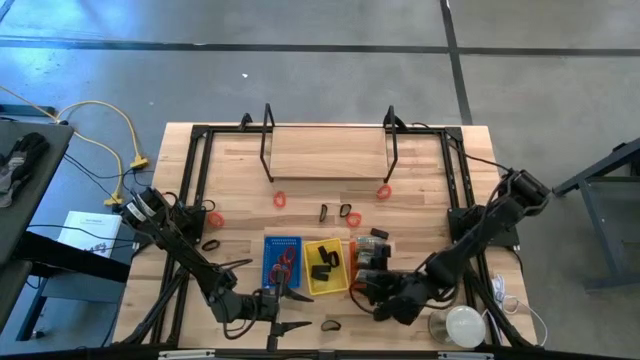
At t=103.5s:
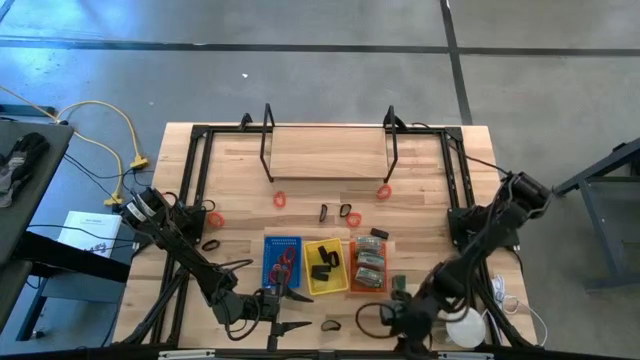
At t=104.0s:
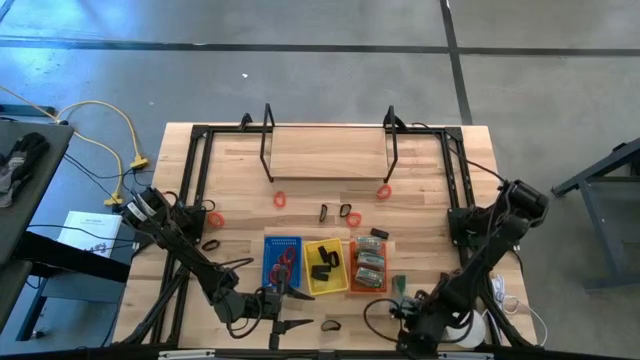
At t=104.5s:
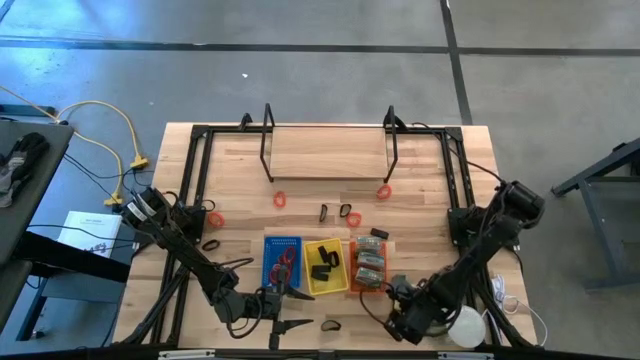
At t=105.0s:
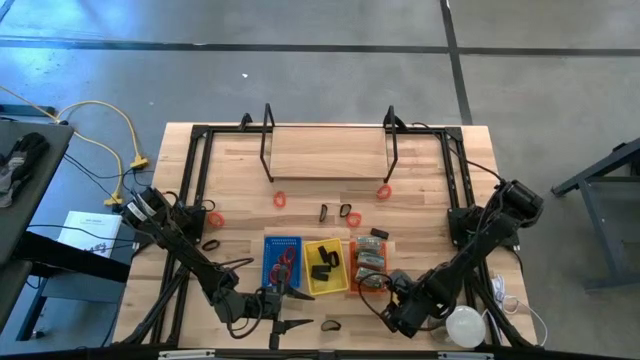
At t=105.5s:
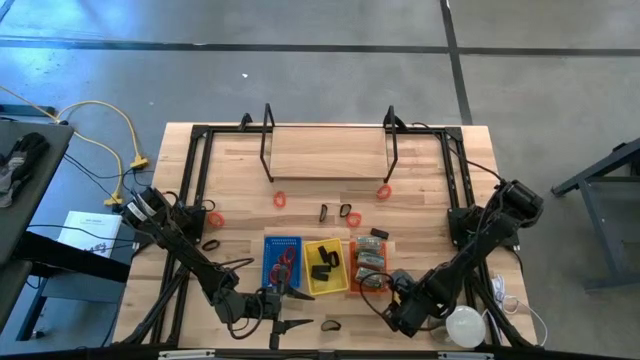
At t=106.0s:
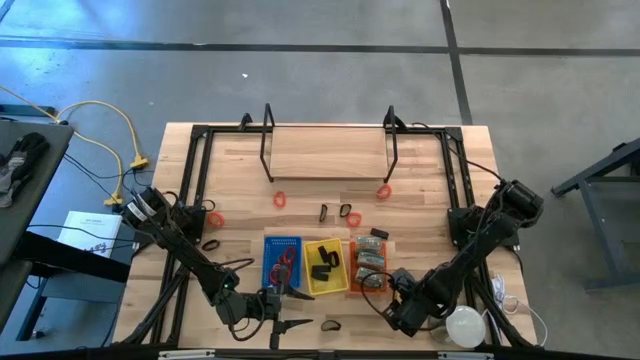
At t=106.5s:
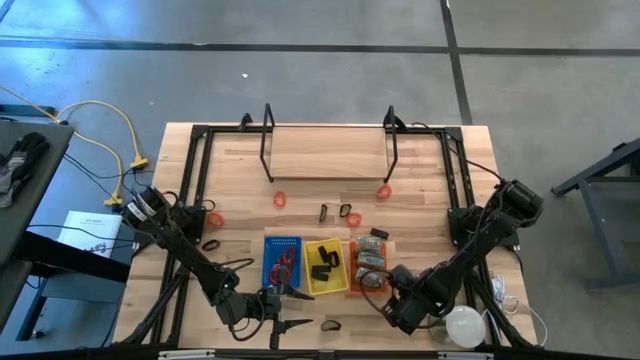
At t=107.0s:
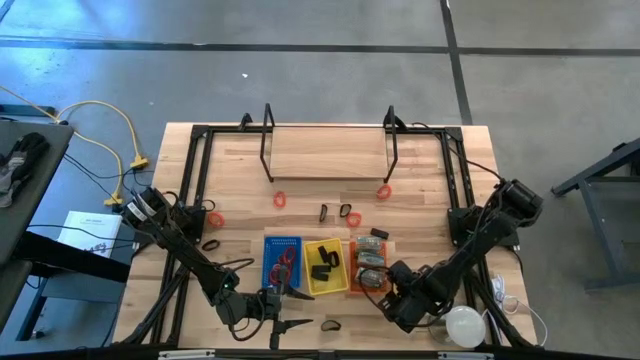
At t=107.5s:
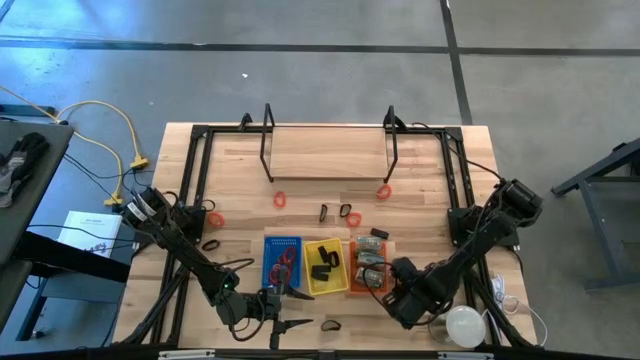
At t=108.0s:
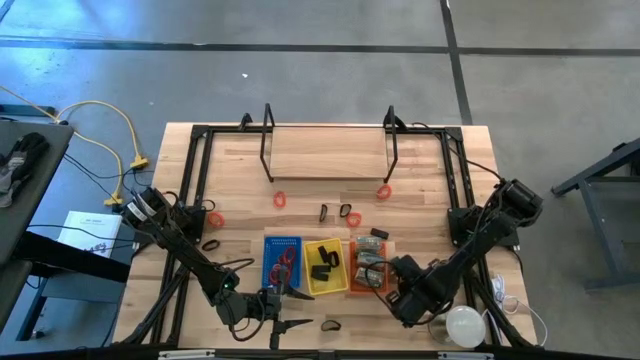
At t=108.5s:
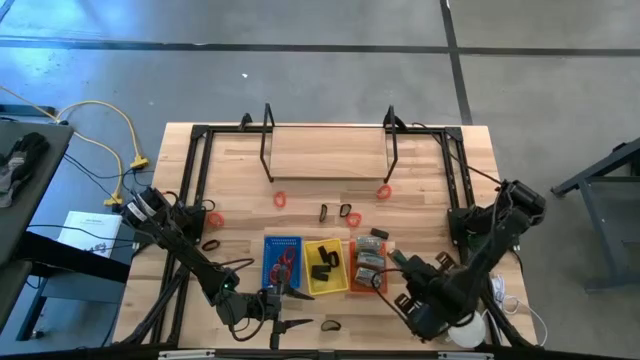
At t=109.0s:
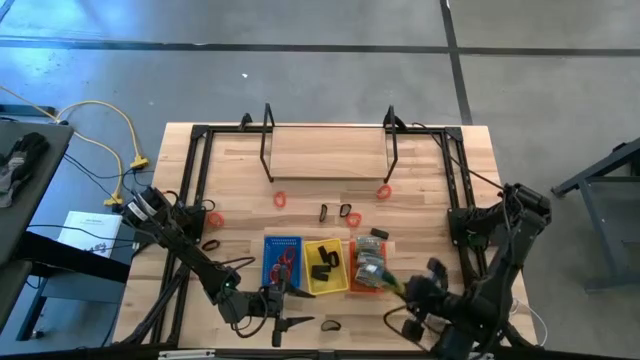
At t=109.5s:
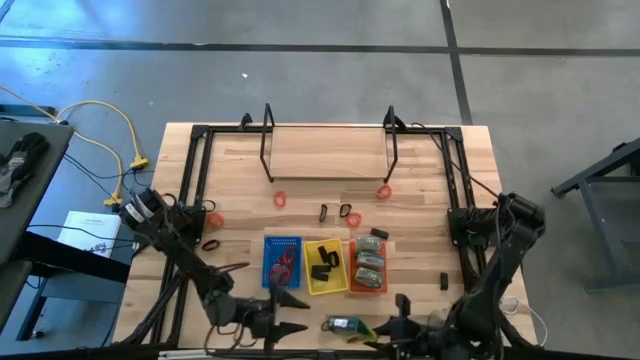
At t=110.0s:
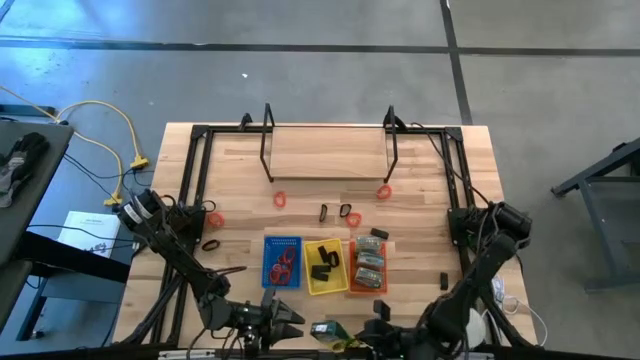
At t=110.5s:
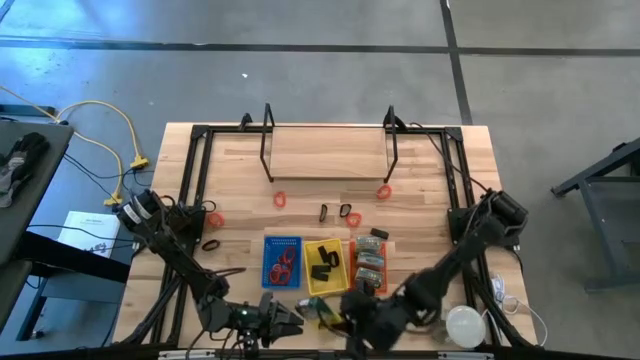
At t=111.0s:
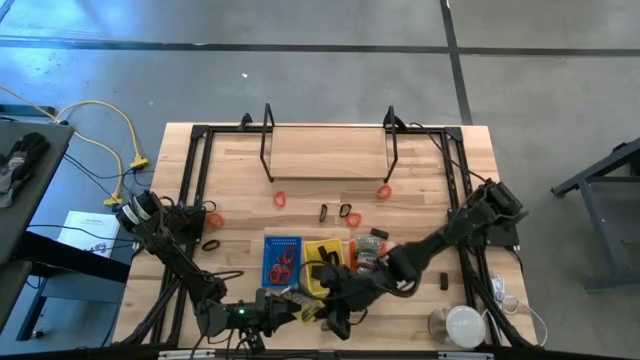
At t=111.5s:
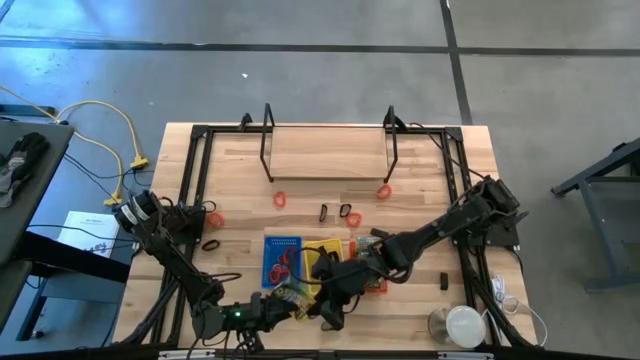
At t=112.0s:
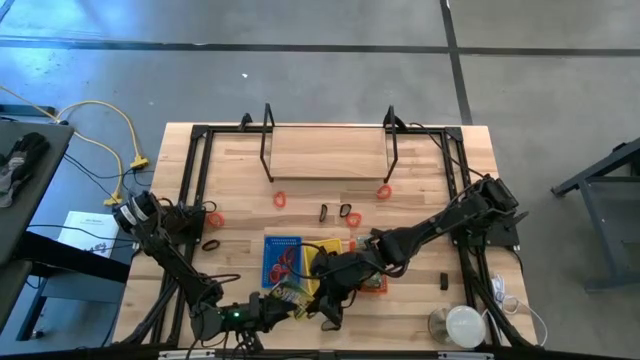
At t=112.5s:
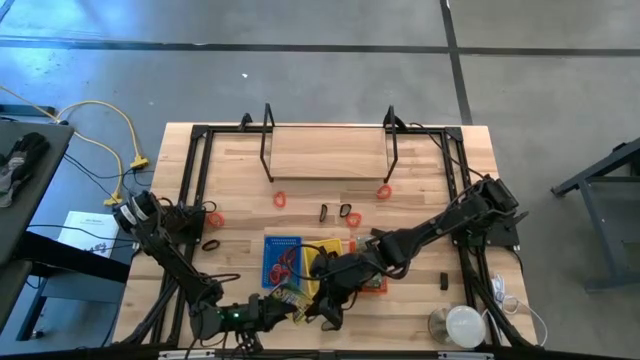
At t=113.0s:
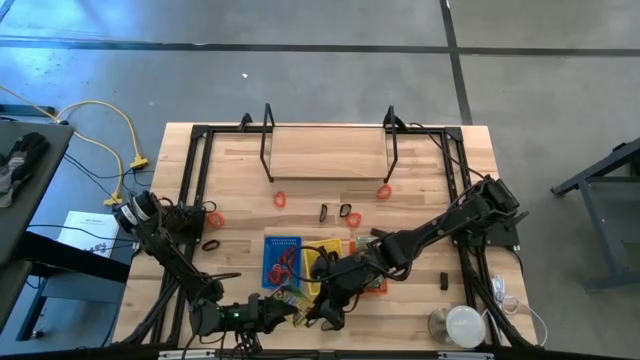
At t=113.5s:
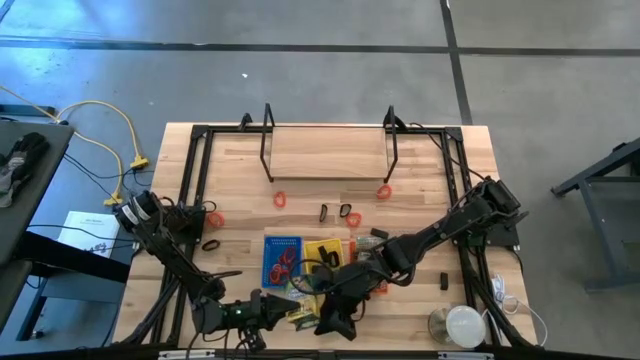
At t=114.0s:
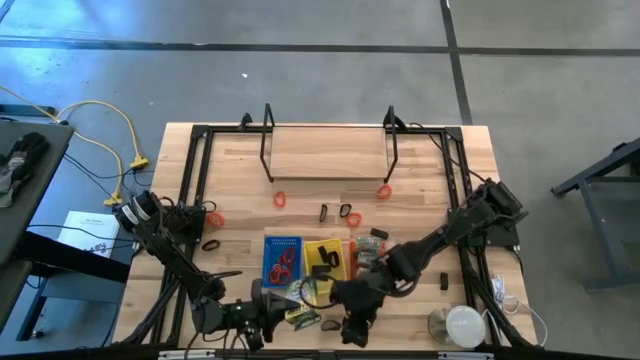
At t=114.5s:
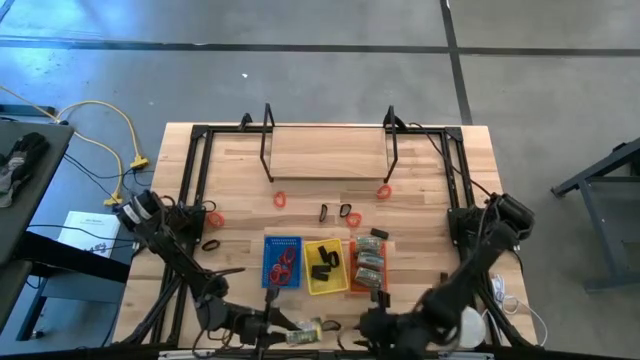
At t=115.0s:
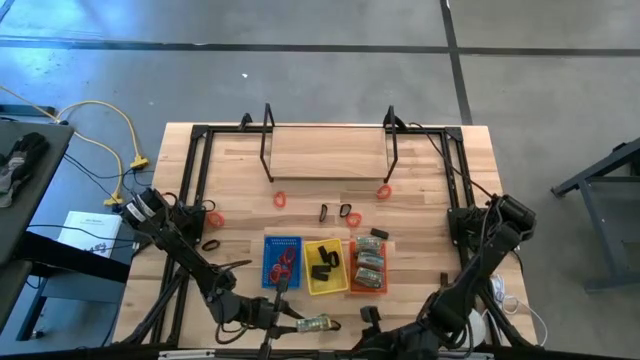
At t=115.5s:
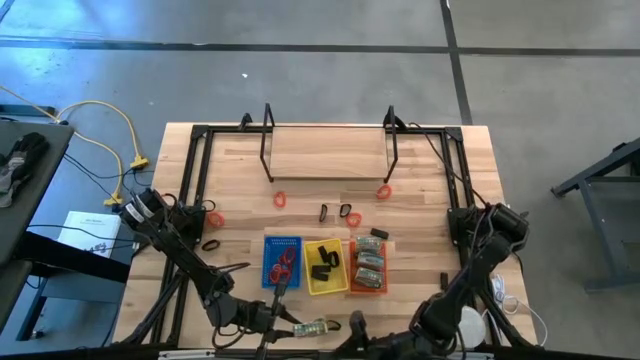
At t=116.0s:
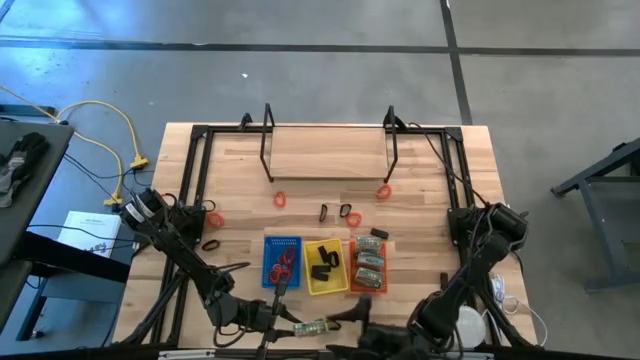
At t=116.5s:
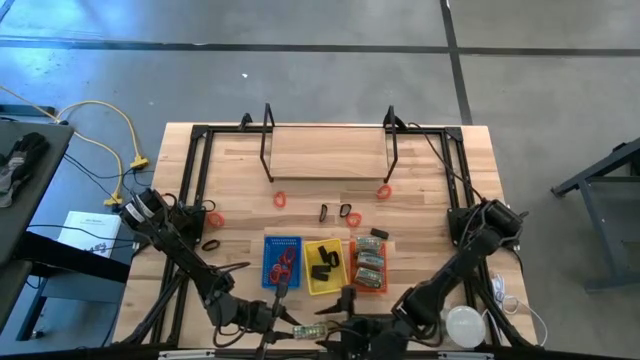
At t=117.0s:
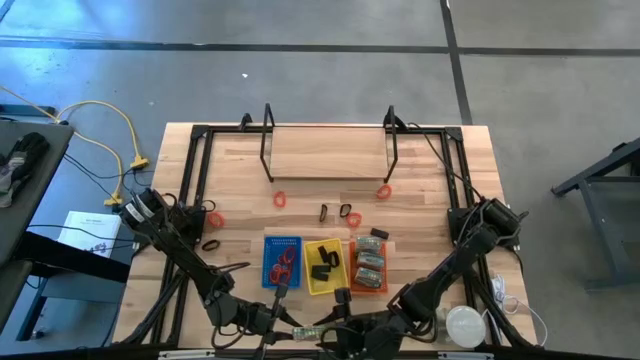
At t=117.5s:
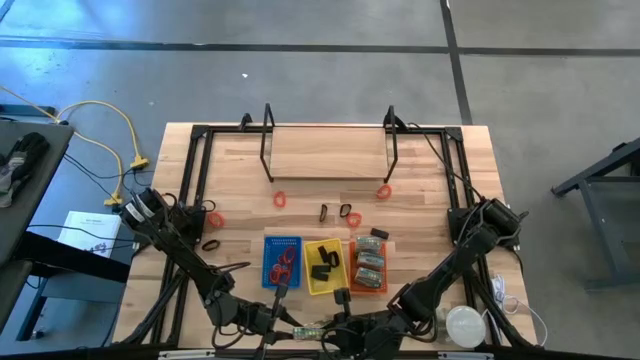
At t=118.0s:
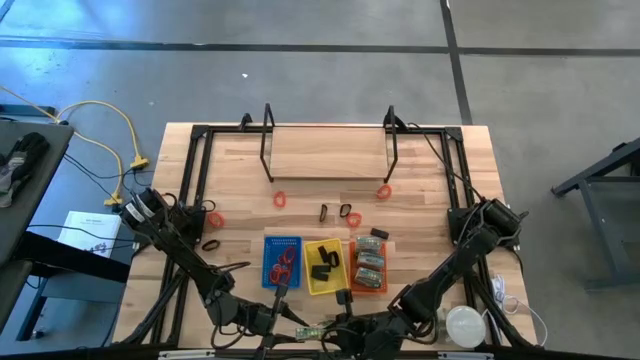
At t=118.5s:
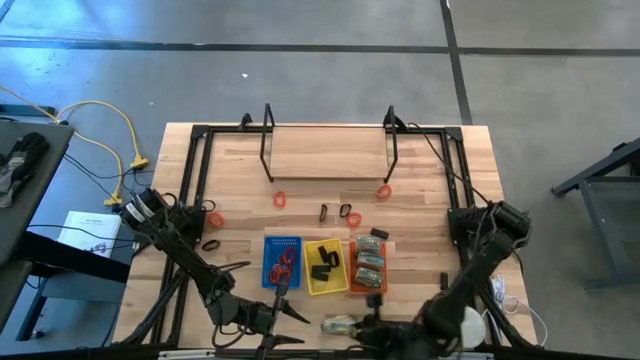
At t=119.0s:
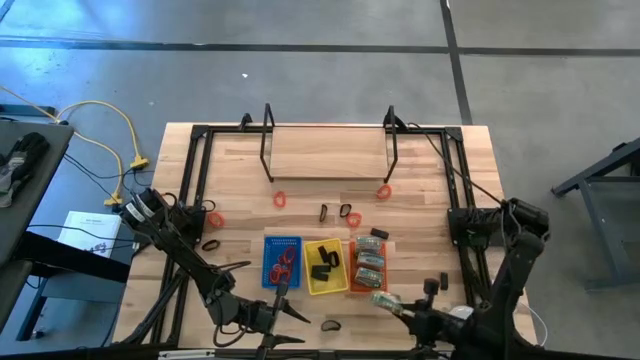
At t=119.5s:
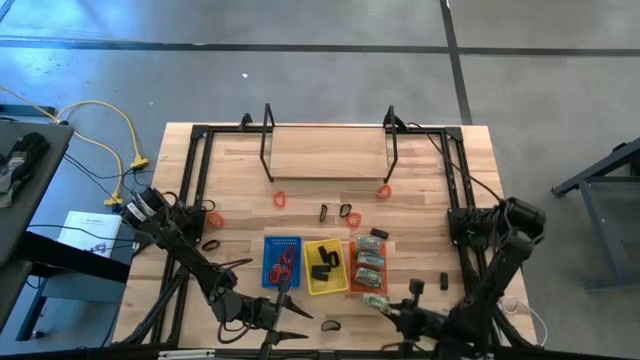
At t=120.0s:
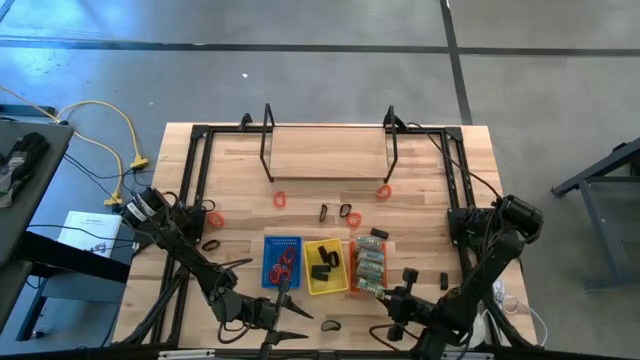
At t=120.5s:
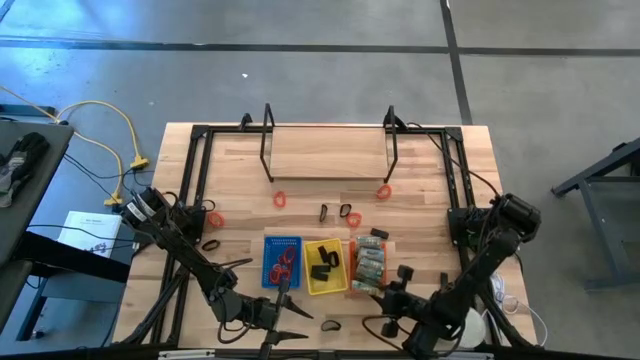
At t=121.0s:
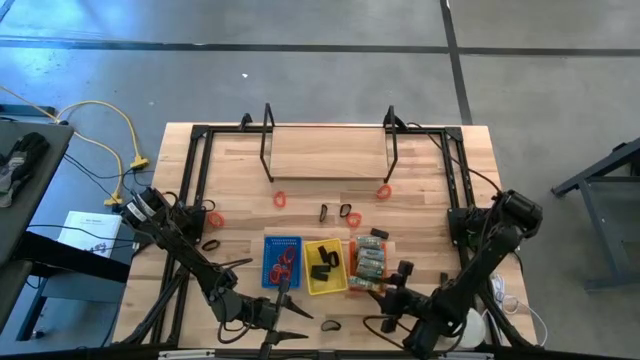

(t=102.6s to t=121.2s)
Task: Pick & Place Office Desk Supplies
Put the crayon box into the orange basket

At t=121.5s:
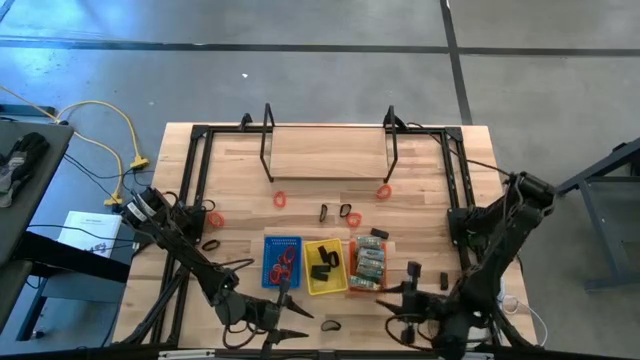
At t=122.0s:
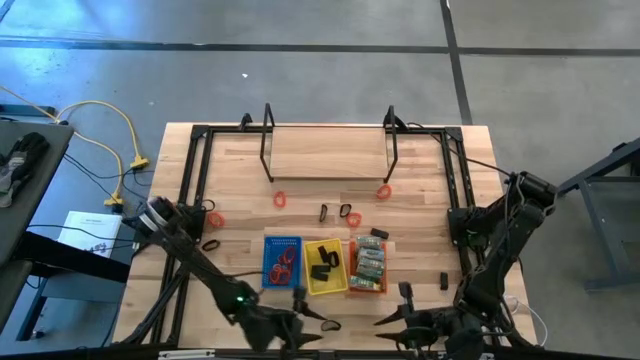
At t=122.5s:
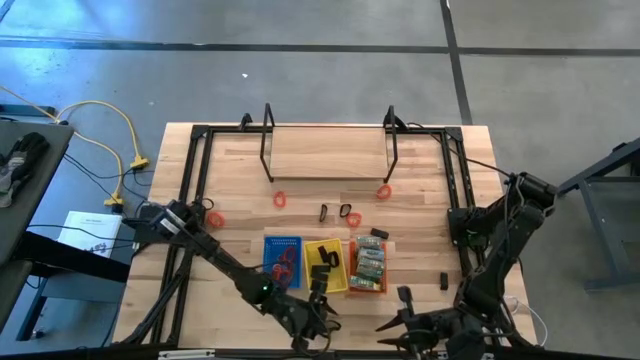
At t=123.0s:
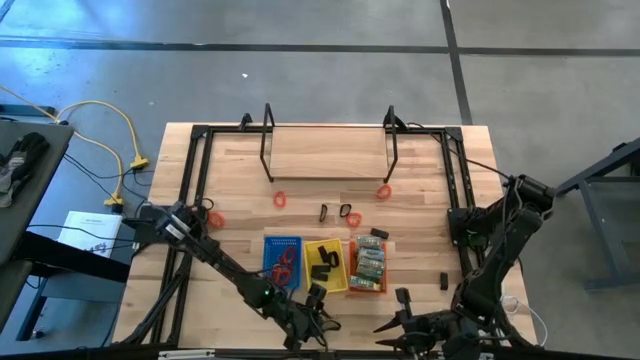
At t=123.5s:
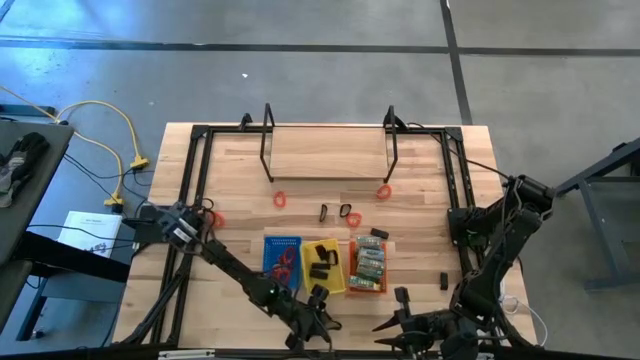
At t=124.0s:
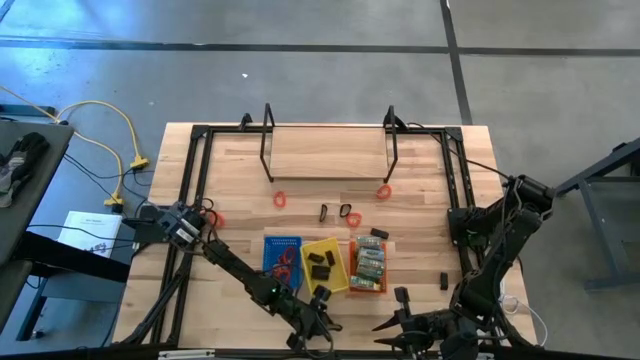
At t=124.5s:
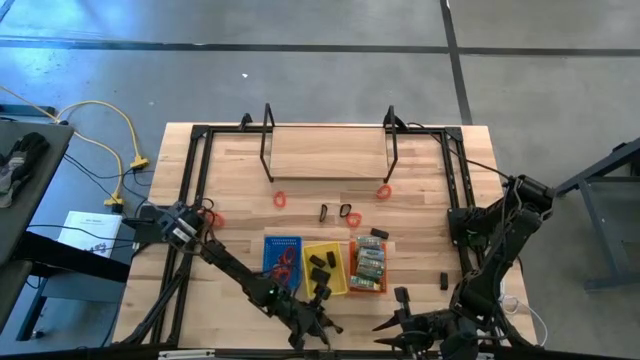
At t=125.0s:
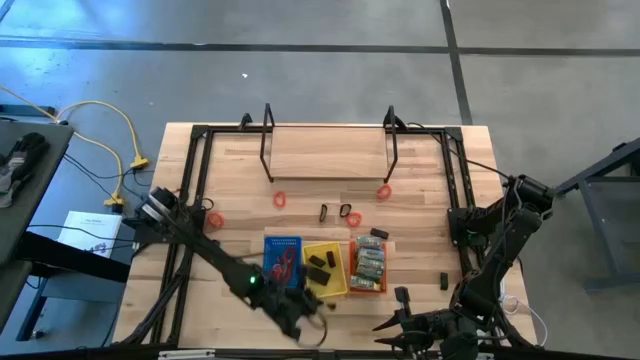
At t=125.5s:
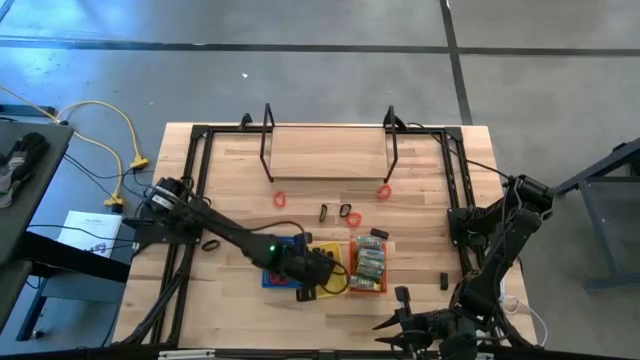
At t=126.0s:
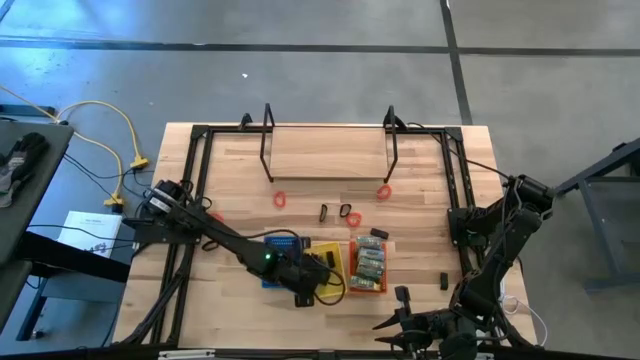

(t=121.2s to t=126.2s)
Put the black rubber band into the yellow basket
